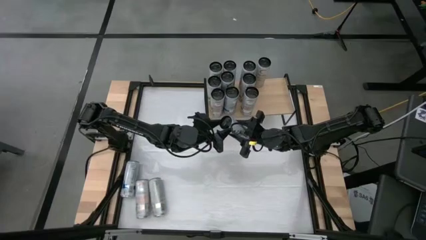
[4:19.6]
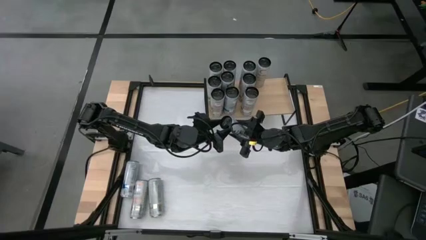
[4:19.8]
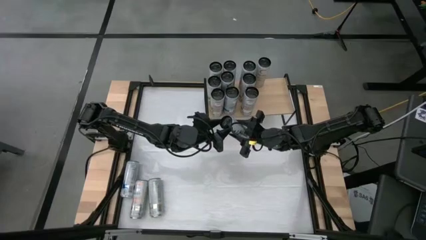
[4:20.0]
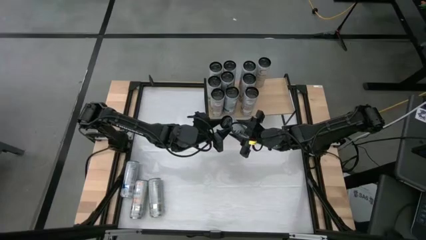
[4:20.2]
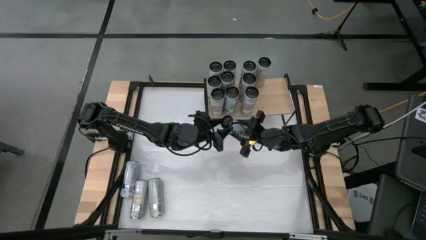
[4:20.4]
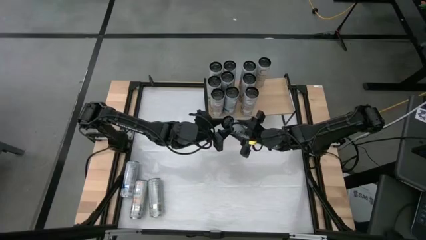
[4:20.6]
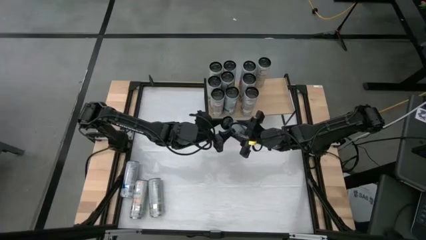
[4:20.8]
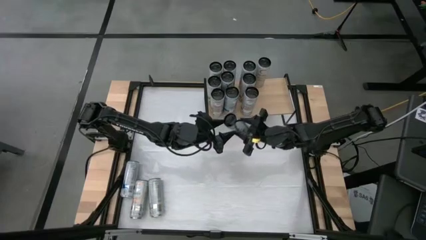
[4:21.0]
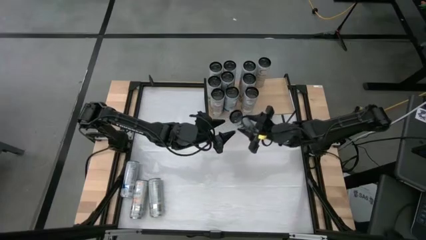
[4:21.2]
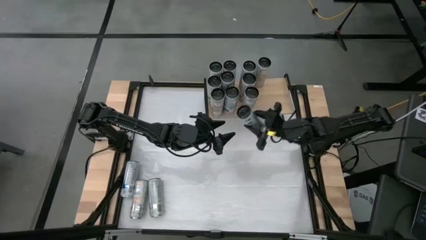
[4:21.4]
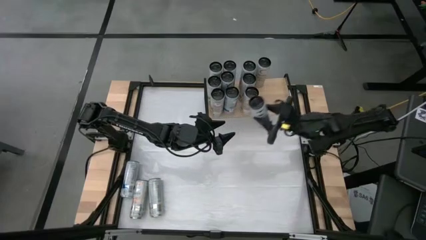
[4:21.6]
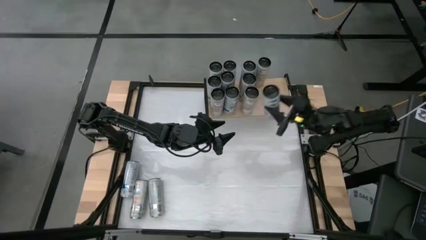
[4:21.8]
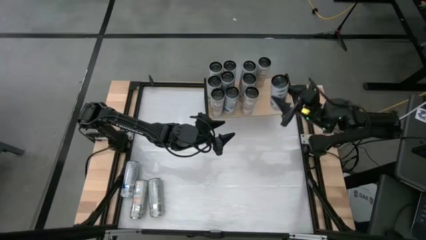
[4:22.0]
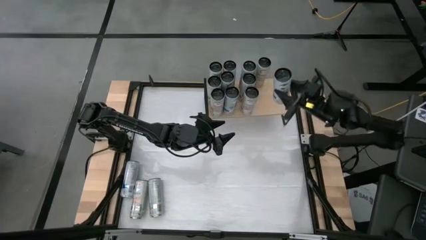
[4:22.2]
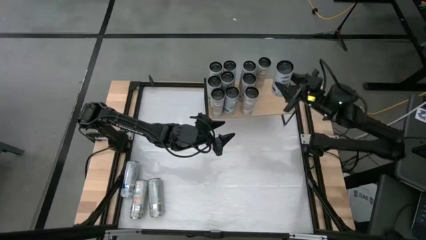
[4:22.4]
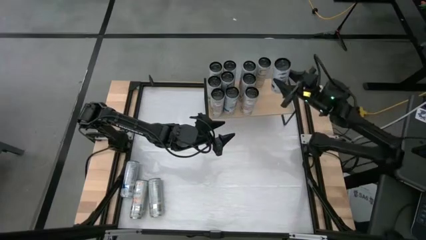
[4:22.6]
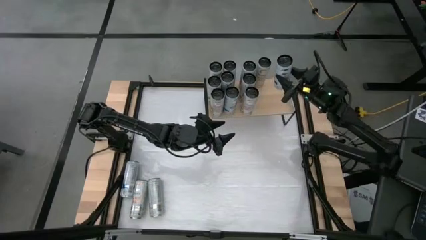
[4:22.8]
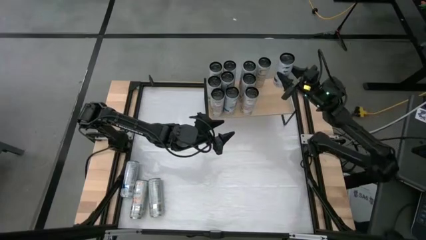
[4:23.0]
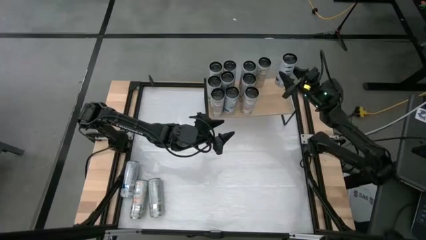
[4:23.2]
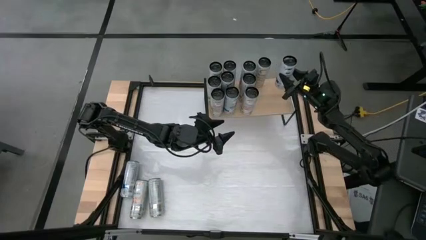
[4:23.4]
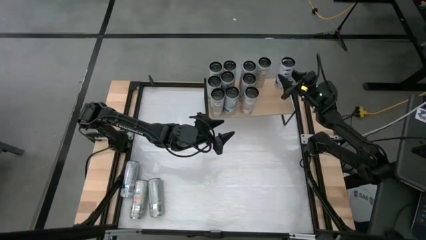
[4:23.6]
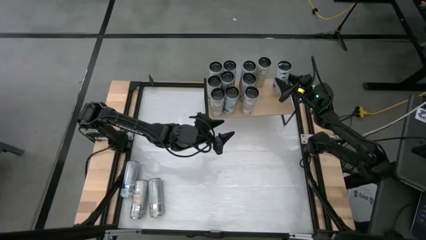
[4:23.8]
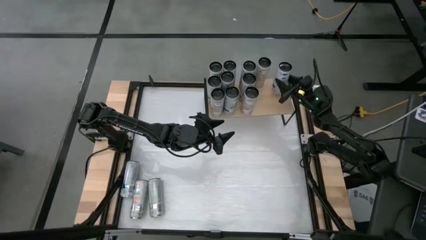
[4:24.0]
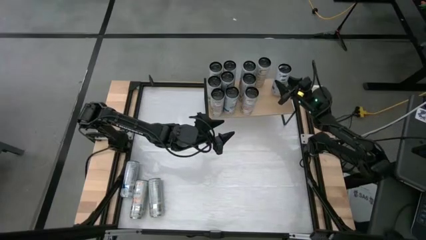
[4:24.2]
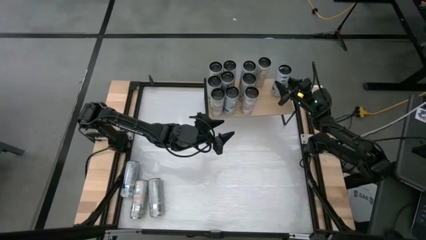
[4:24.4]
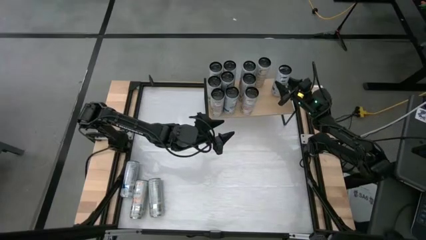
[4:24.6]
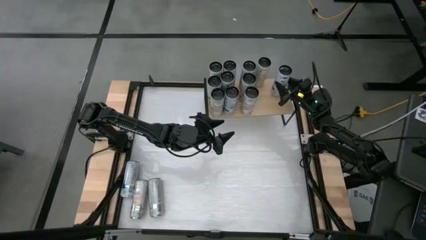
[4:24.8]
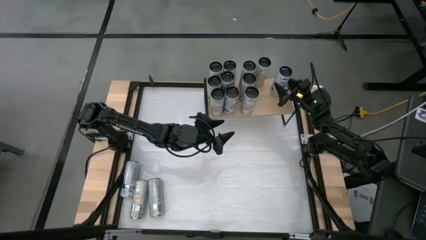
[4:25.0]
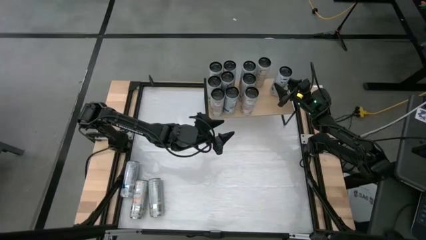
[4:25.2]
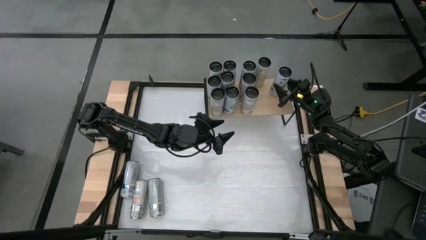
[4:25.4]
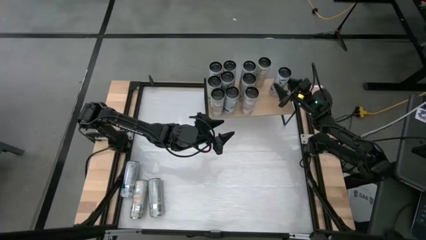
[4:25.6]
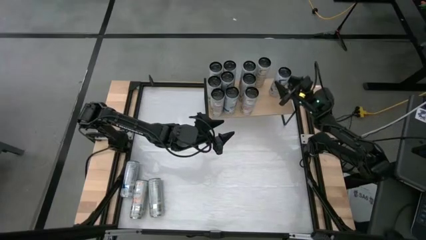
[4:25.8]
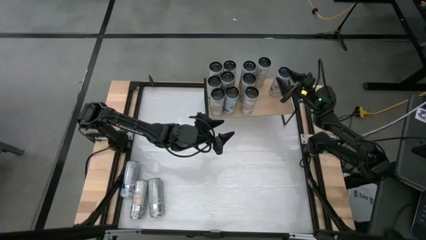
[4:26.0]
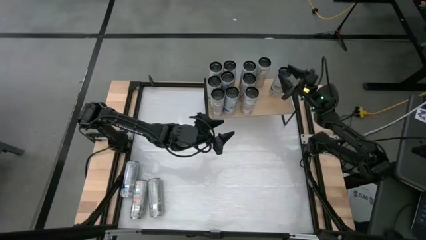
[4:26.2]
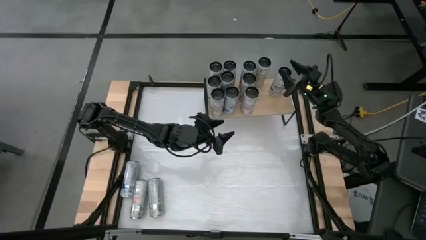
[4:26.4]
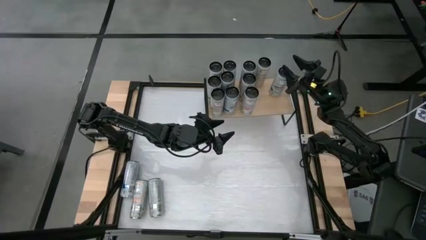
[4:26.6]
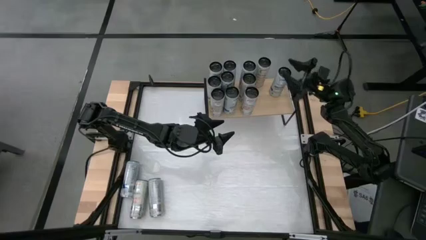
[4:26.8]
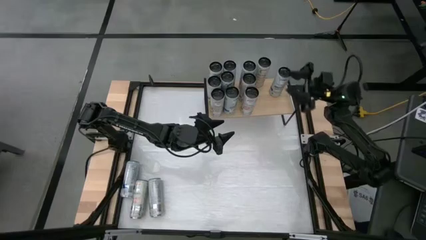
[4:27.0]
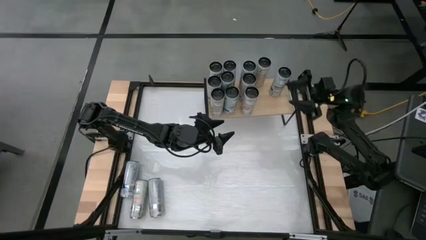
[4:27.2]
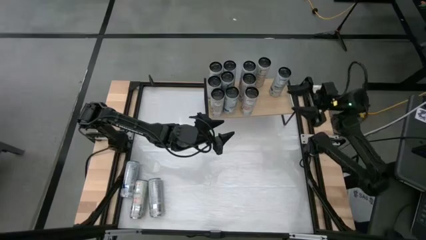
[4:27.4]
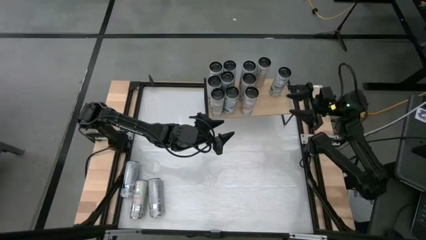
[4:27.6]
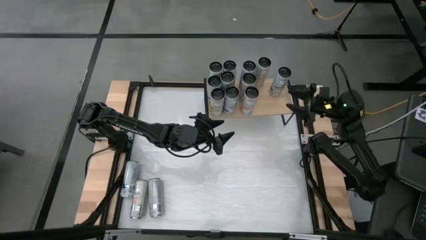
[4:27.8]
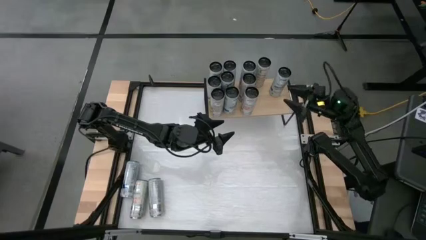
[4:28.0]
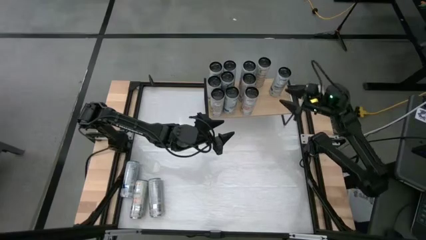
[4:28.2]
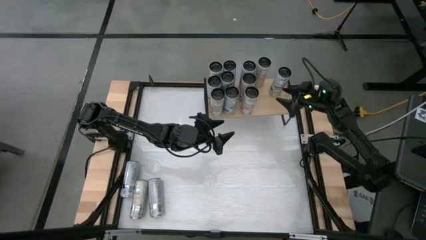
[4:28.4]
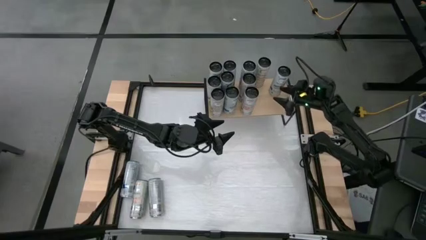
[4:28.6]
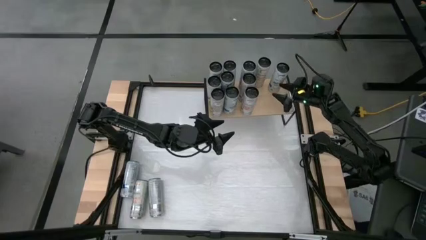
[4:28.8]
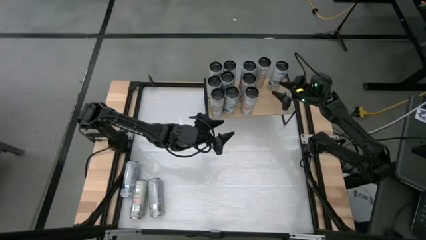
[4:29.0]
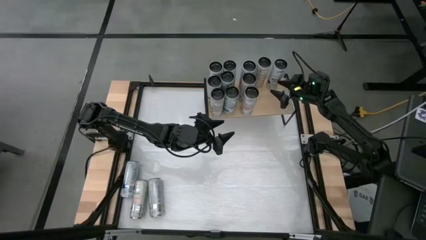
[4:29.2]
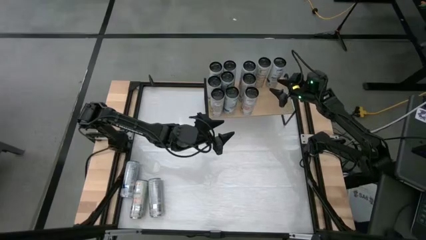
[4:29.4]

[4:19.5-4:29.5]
Task: Place canned beverage on shelf
Put the blue soda can on the shelf

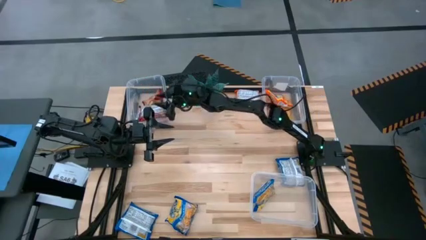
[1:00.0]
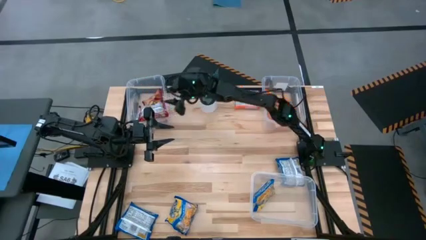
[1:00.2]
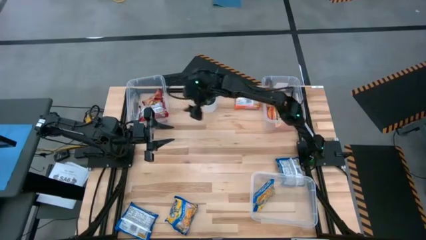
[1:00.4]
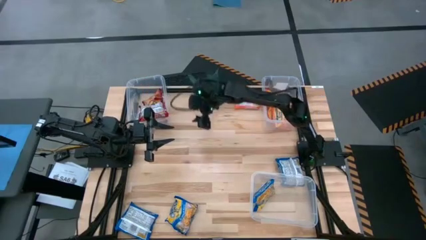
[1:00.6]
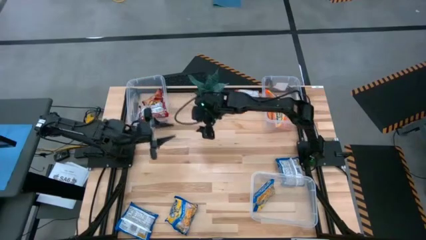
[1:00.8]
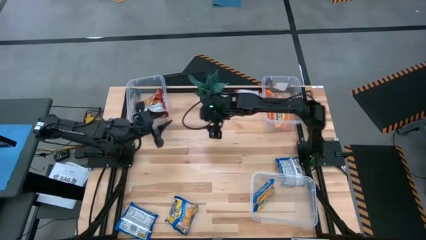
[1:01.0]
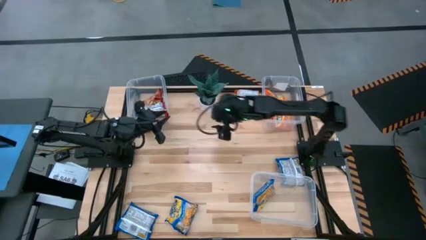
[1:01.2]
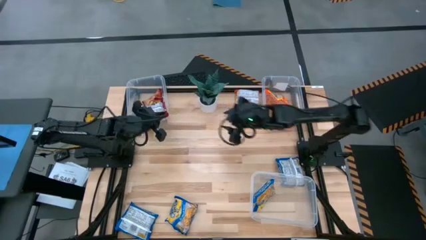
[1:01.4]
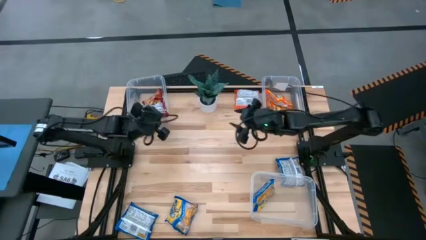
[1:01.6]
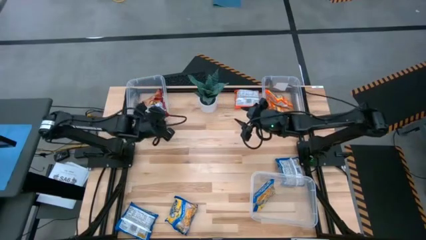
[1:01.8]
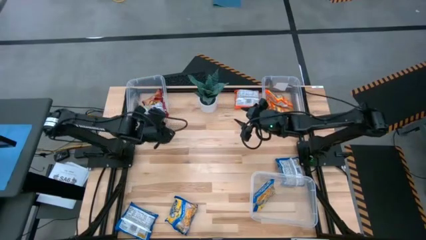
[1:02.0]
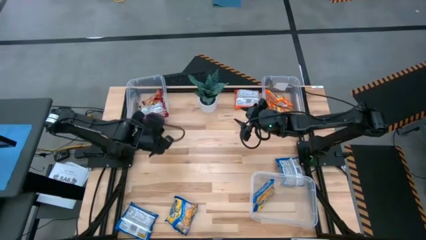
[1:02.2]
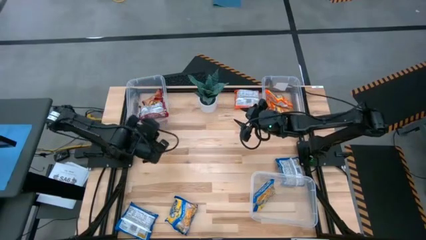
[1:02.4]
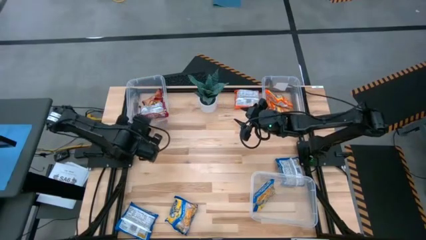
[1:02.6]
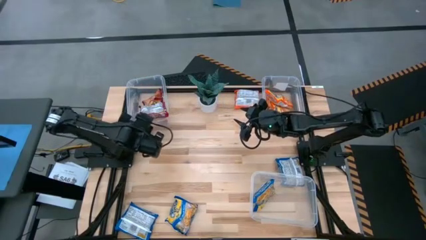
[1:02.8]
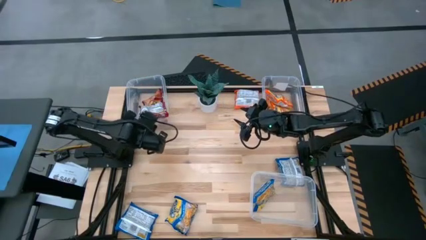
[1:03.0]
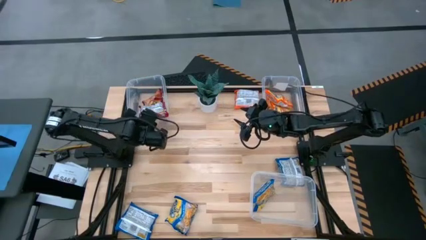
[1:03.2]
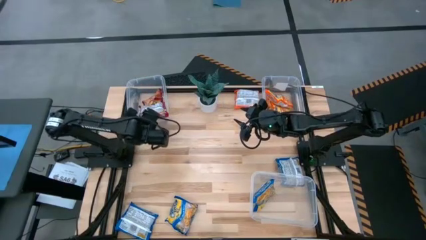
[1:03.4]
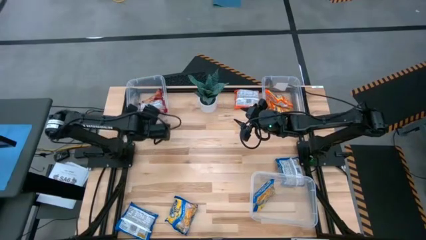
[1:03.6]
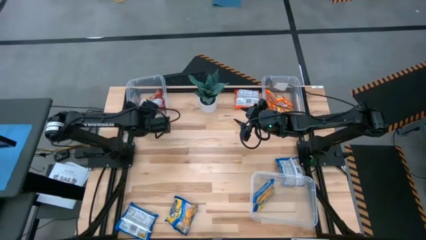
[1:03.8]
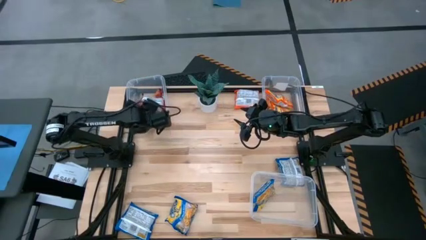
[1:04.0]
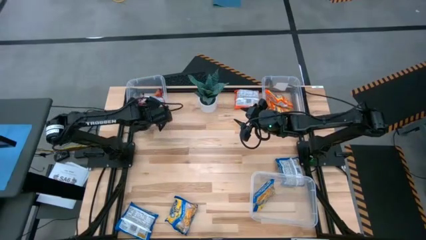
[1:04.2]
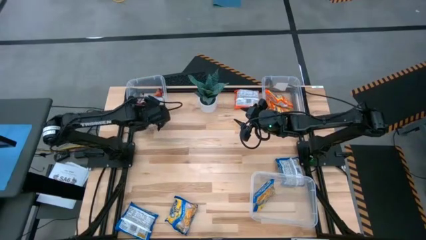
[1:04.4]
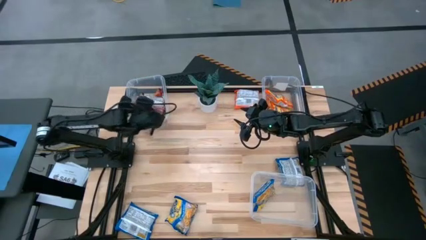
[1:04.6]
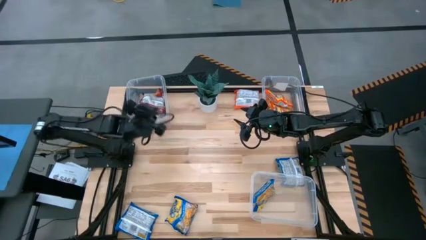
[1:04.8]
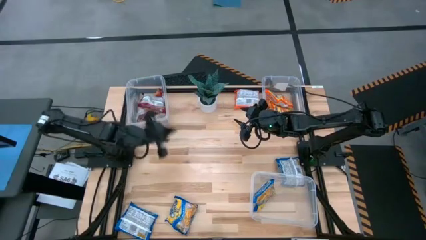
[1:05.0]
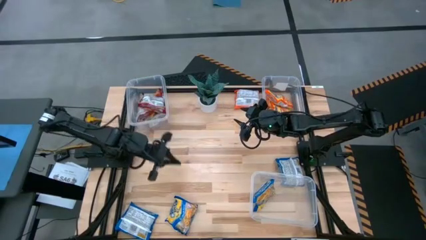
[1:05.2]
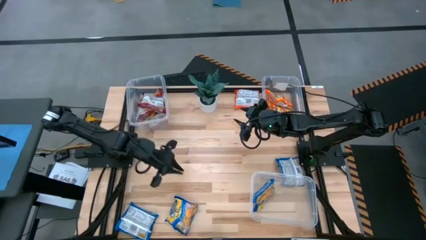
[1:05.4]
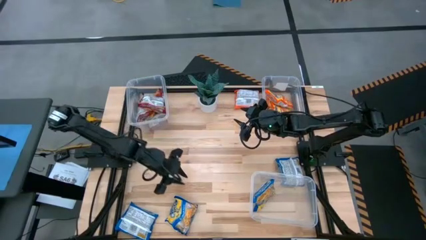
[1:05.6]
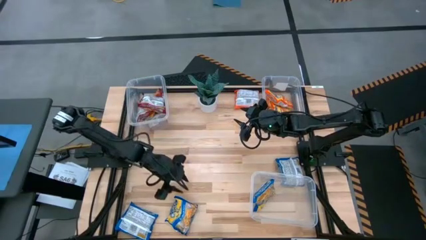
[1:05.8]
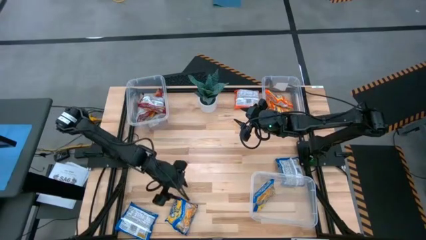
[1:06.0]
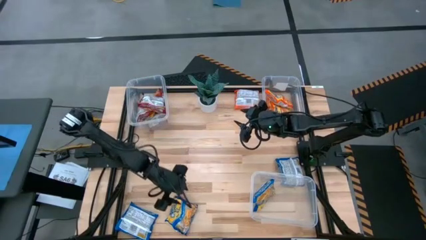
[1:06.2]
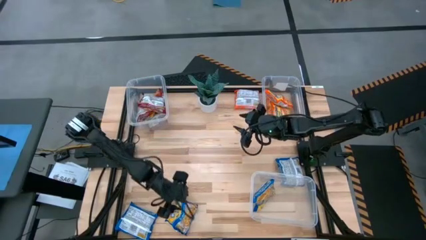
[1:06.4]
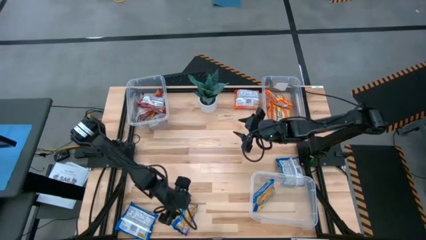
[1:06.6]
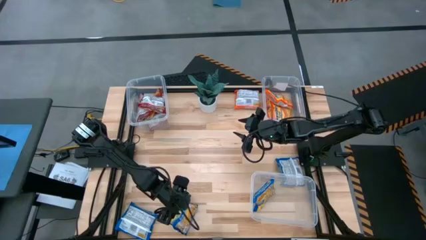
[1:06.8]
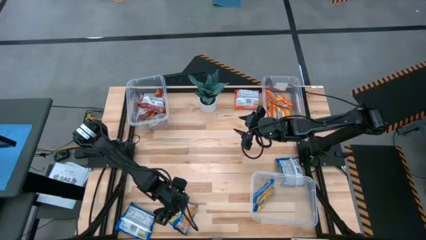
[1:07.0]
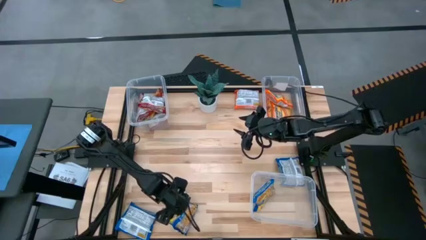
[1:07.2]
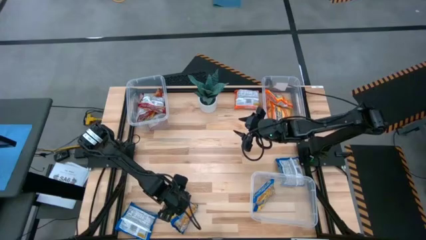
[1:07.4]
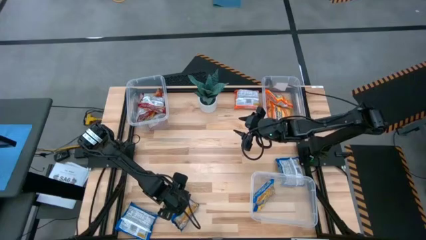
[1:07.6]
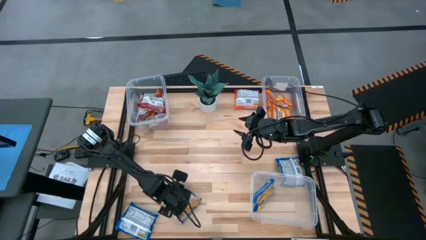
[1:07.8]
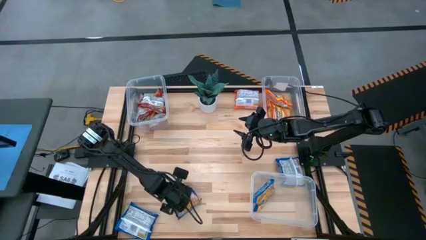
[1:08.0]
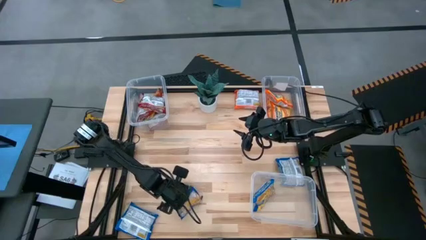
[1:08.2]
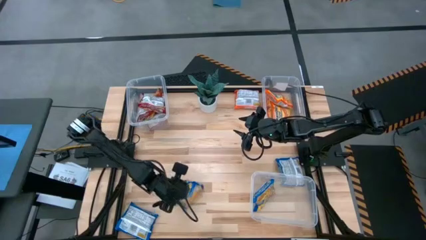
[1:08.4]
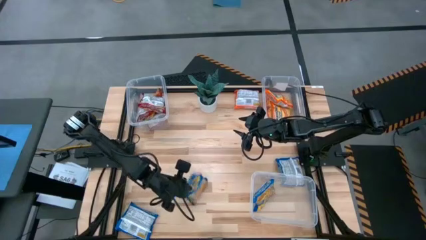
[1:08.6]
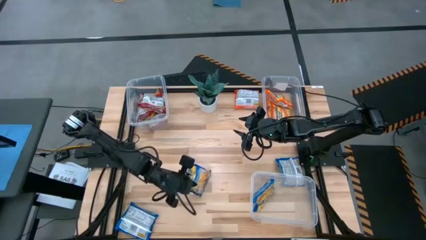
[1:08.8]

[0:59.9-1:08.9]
Task: Sort Maruchan noodles
Put the blue noodle pack in the bottom right transparent bin
